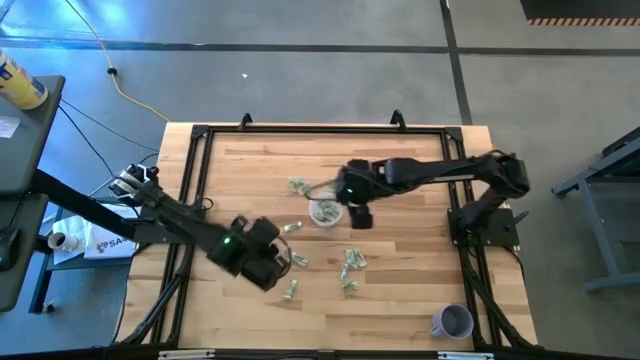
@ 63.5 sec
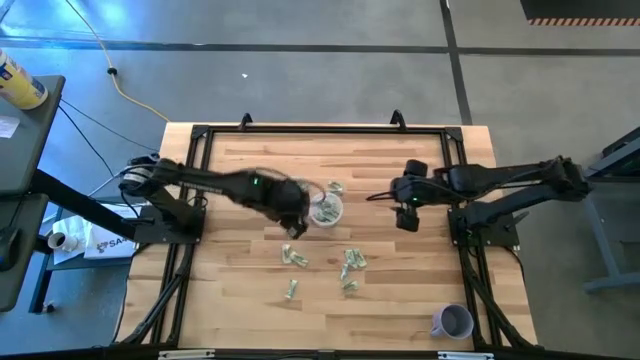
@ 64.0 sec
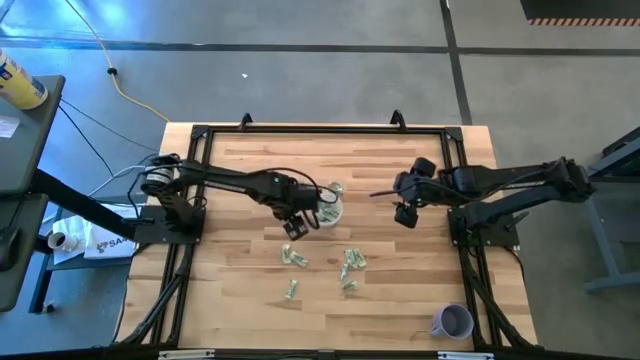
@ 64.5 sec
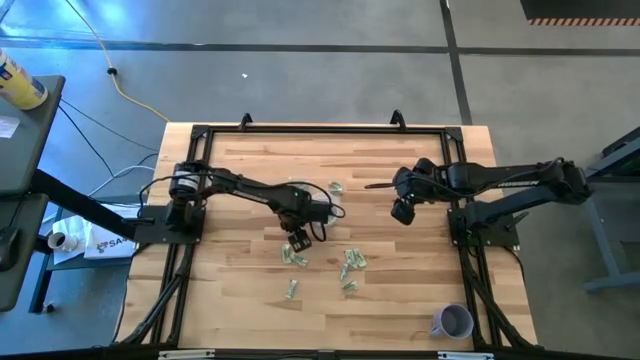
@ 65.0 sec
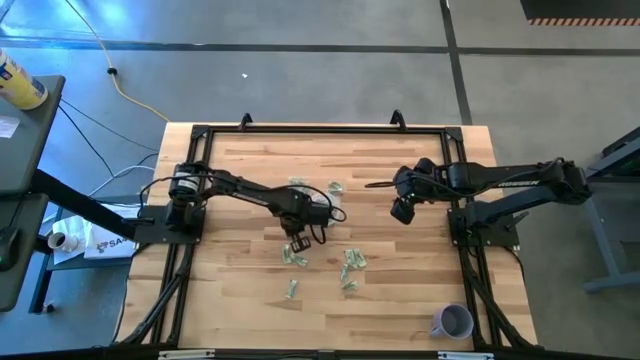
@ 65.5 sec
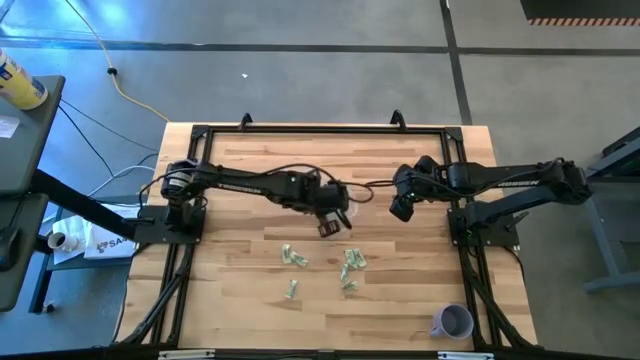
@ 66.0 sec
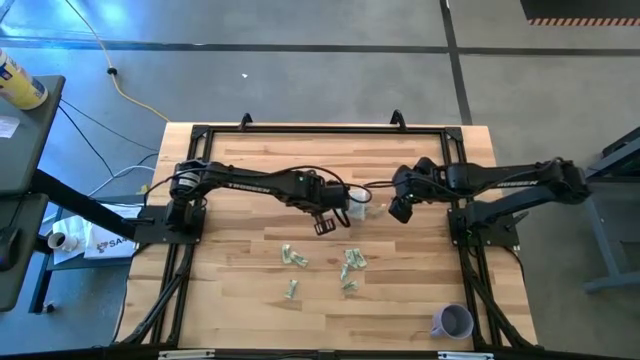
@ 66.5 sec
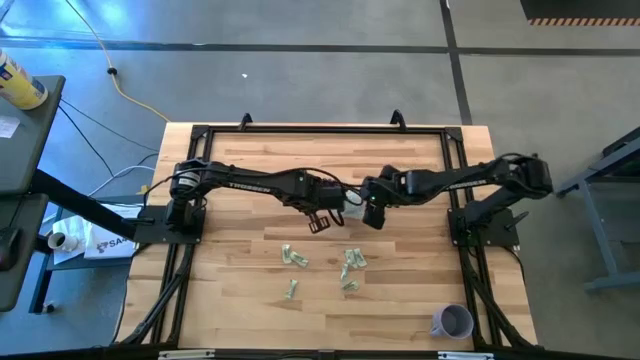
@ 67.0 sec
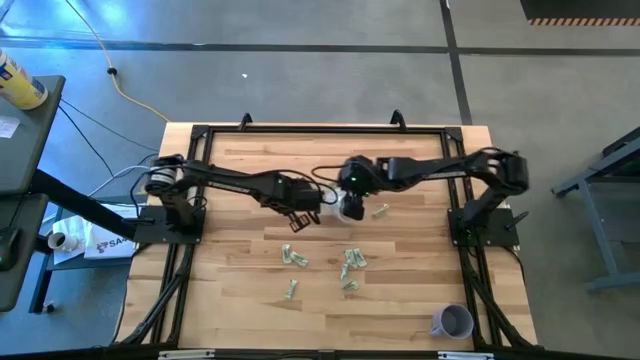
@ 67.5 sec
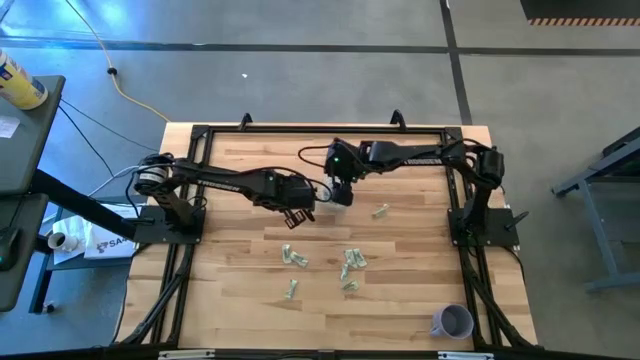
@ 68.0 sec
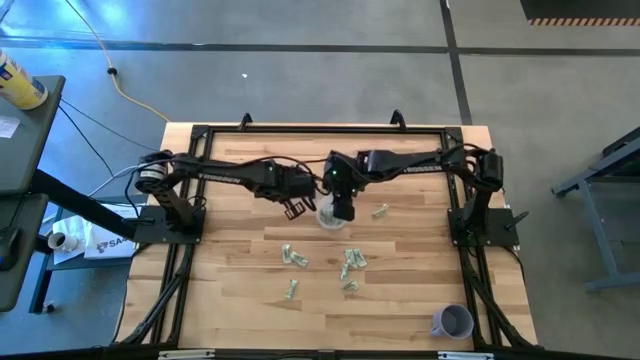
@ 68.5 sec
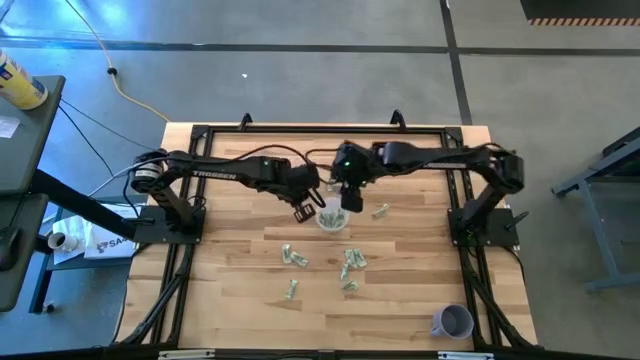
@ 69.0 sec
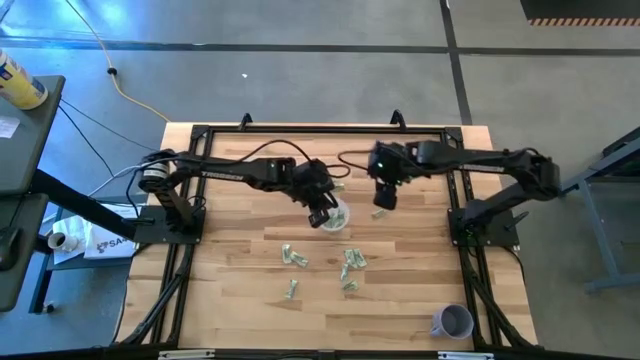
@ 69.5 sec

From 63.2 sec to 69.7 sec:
Task: Pick and place Stevia / Truvia into bins
Put the white stevia packet into the transparent container

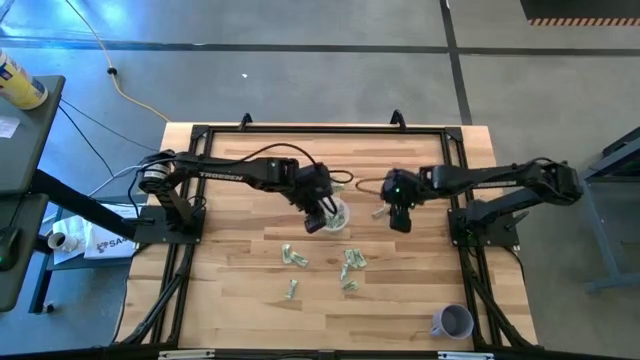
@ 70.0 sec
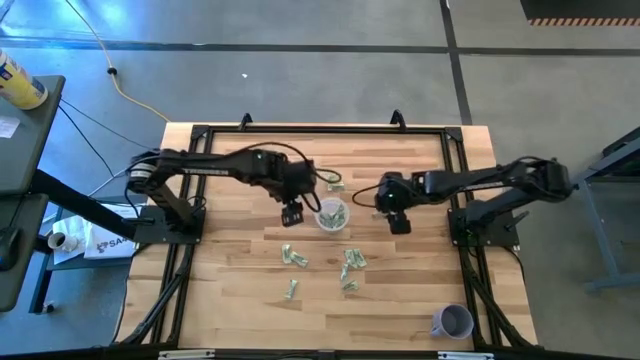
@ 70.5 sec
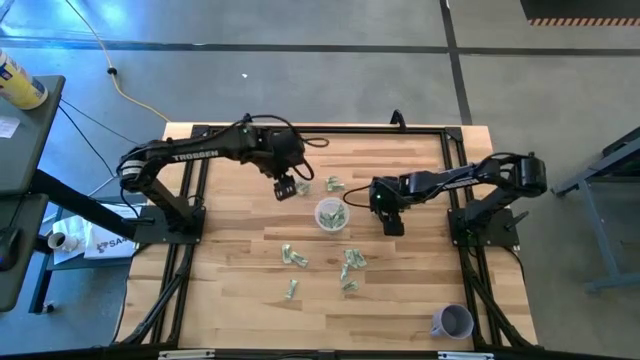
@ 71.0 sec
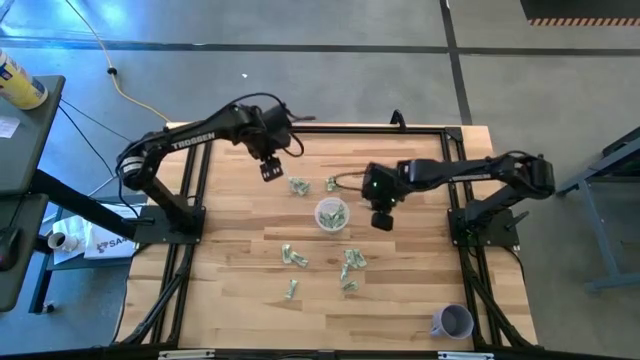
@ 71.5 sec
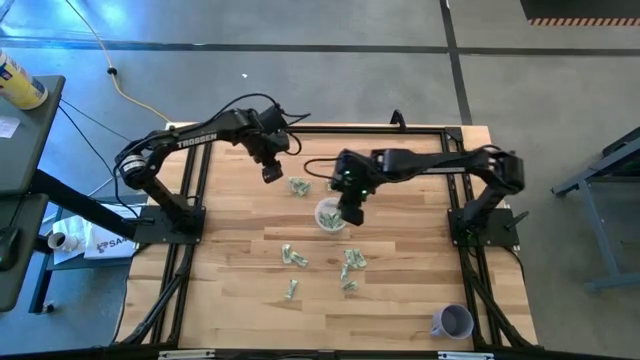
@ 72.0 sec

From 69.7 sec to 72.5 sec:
Put the white stevia packet into the transparent container

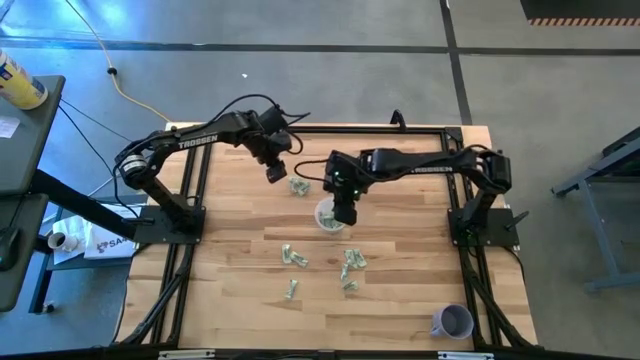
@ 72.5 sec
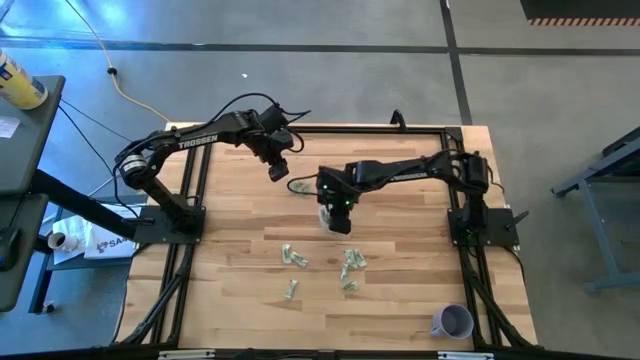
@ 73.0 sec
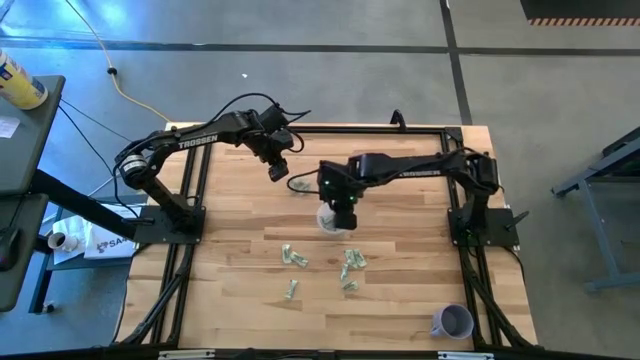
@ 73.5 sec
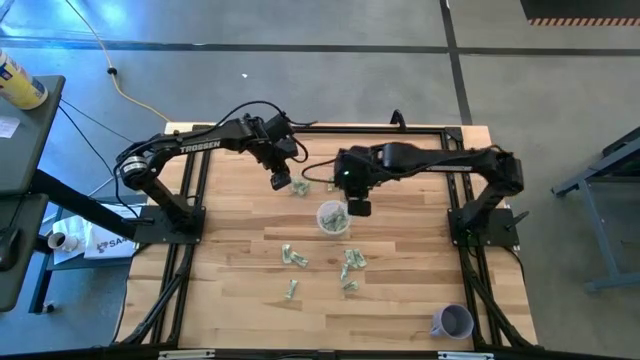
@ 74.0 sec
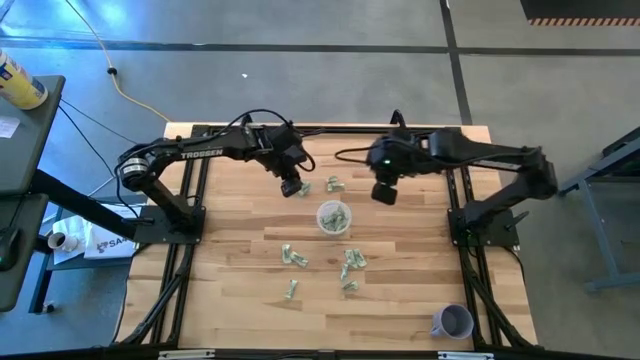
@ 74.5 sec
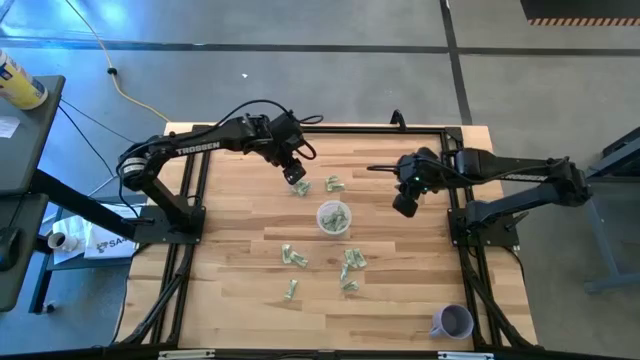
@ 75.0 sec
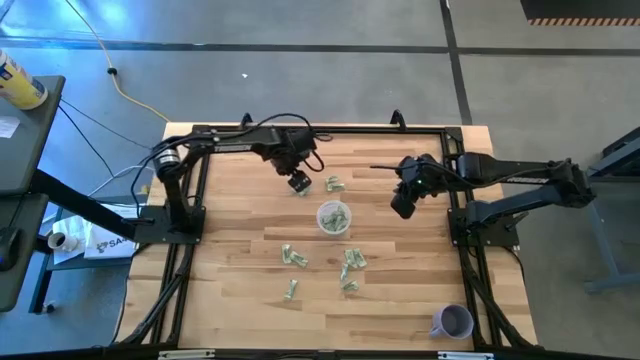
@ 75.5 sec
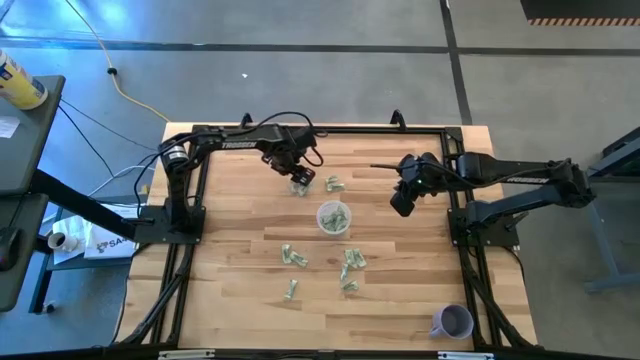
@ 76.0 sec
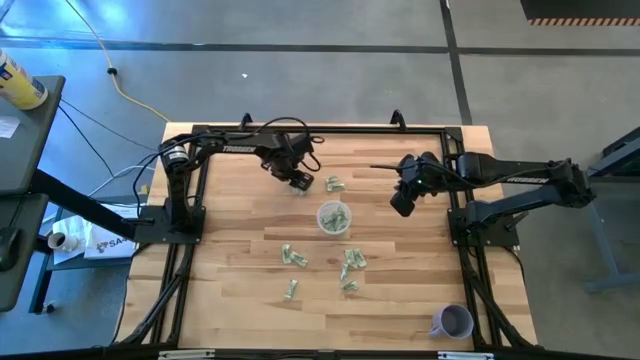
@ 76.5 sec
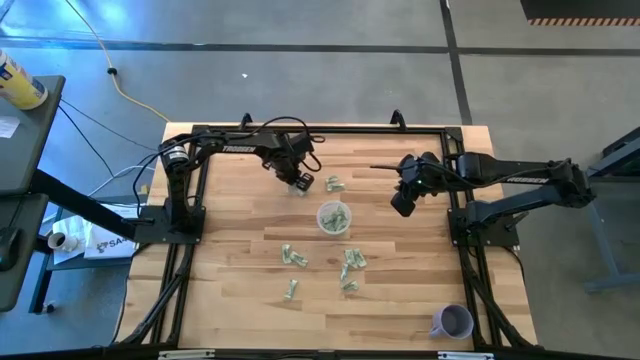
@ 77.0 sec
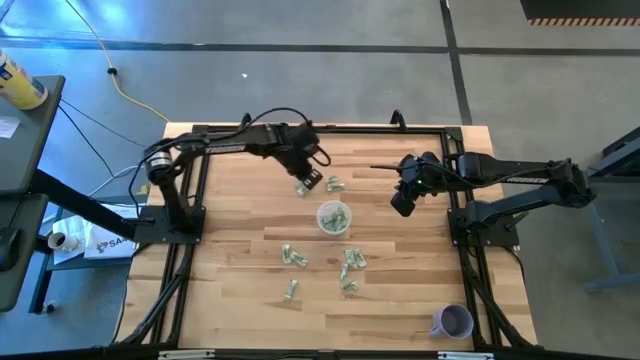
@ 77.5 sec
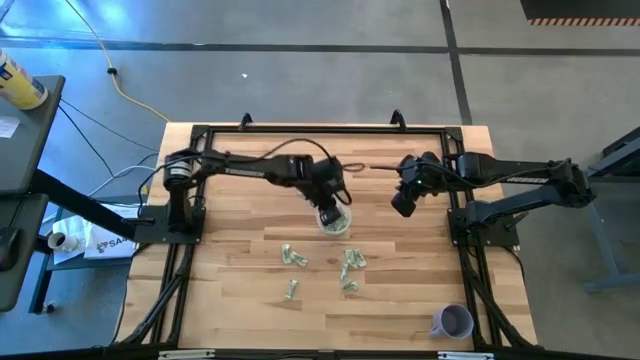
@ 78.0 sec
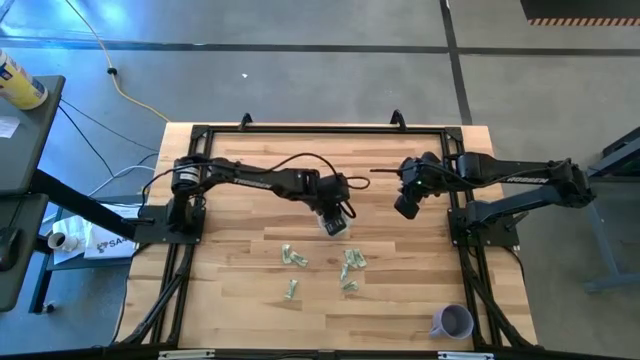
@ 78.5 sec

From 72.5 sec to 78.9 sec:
Put the white stevia packet into the transparent container

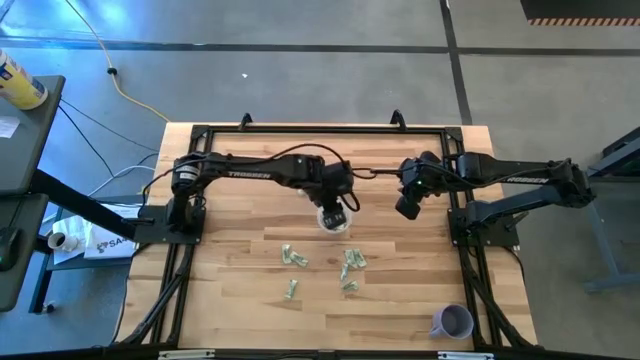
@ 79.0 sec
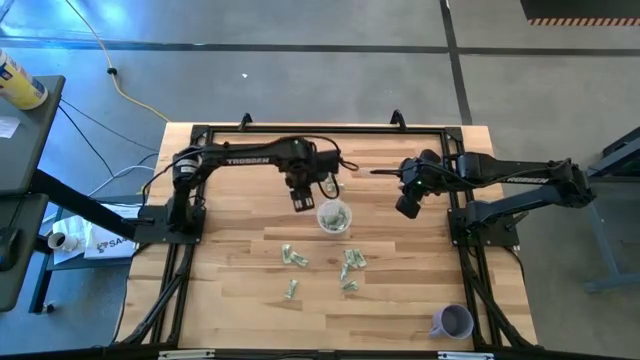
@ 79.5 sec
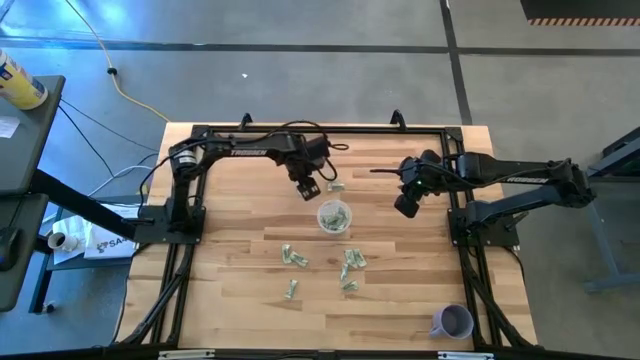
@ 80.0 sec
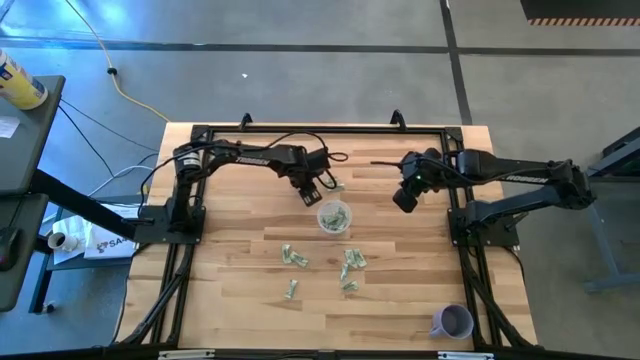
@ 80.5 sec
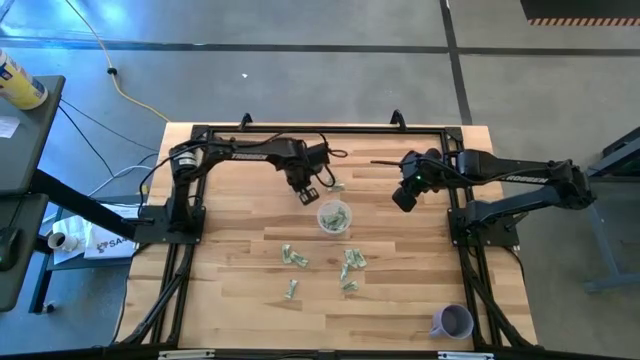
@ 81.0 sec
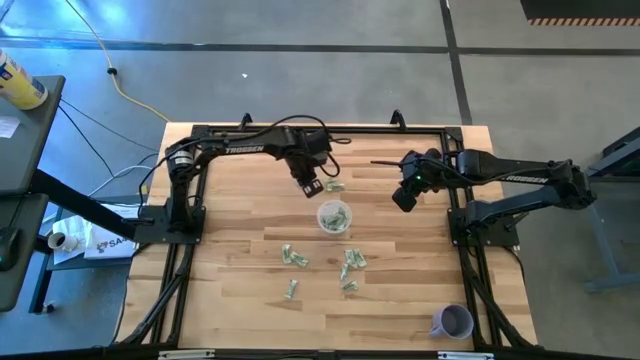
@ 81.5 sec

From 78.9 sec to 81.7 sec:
Put the white stevia packet into the transparent container

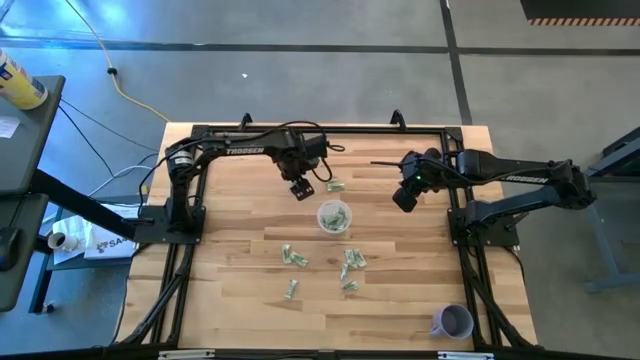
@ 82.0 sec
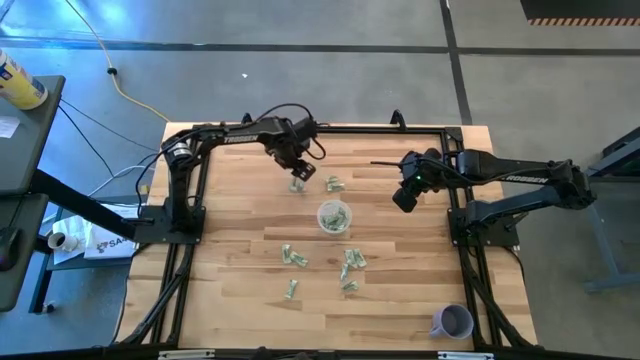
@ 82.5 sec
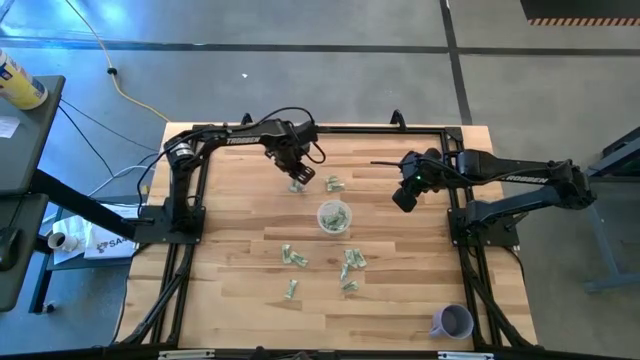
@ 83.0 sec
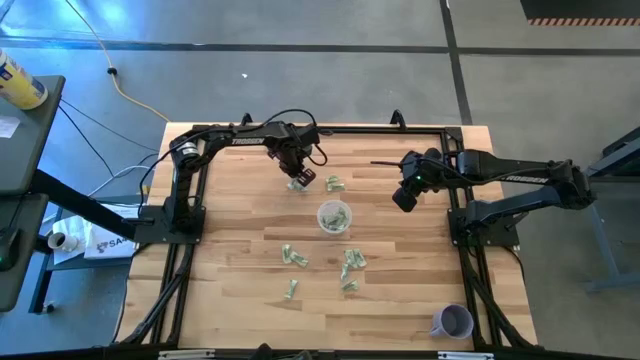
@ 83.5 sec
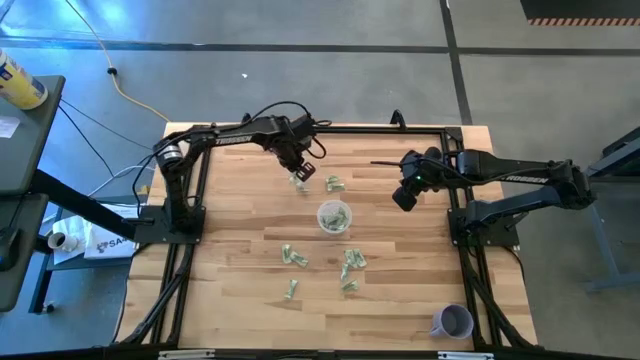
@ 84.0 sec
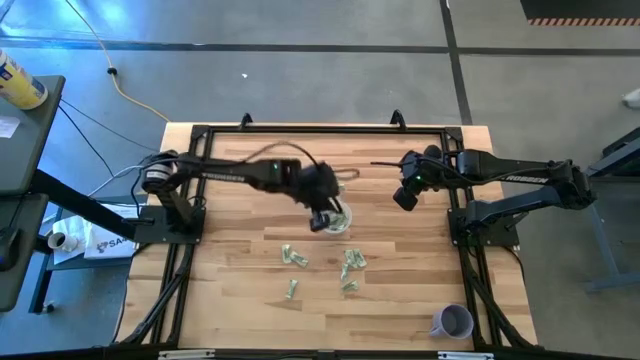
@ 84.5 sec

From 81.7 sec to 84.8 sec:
Put the white stevia packet into the transparent container
